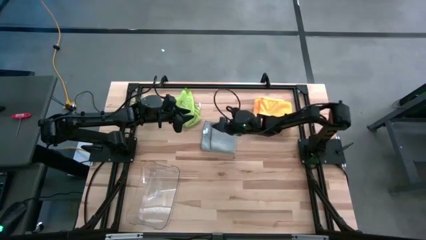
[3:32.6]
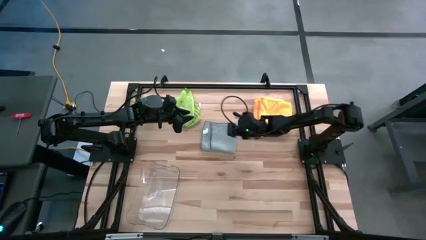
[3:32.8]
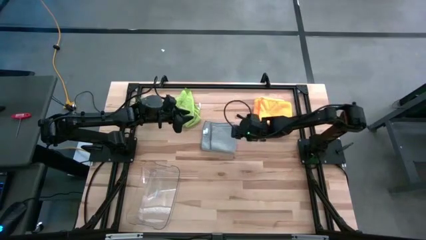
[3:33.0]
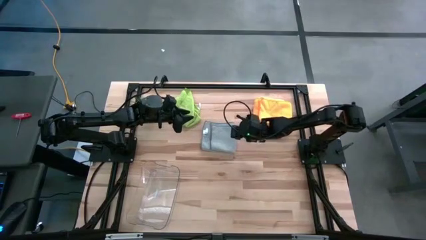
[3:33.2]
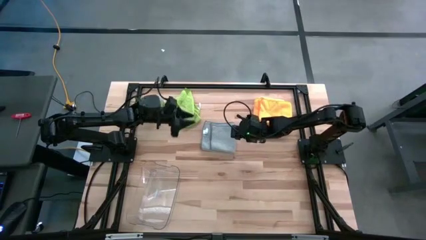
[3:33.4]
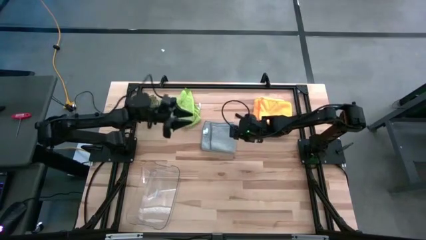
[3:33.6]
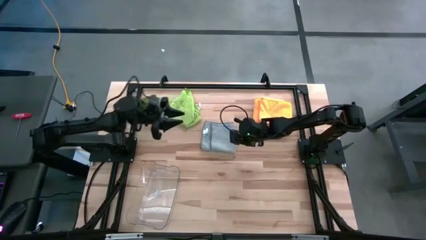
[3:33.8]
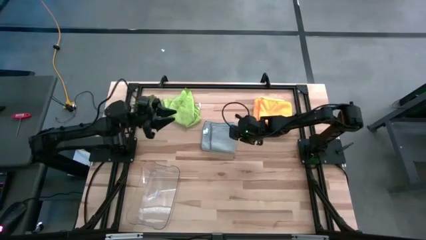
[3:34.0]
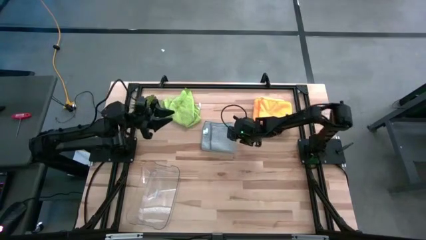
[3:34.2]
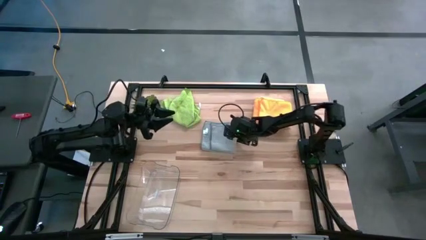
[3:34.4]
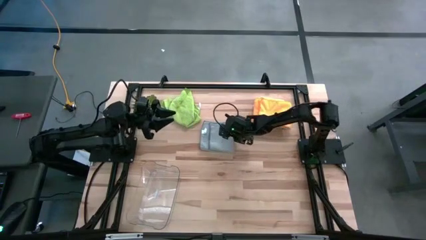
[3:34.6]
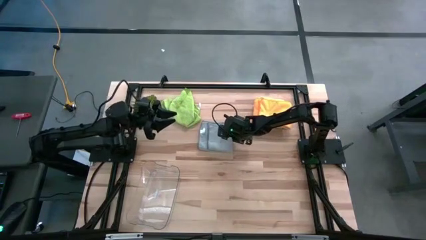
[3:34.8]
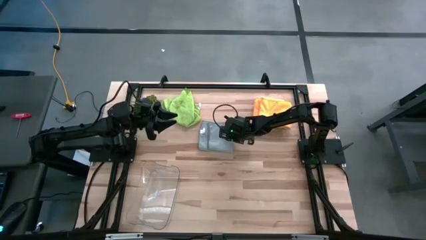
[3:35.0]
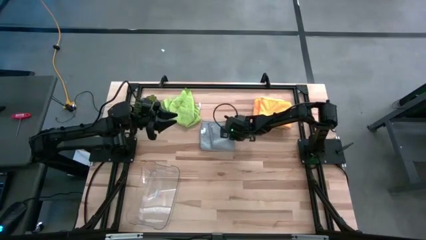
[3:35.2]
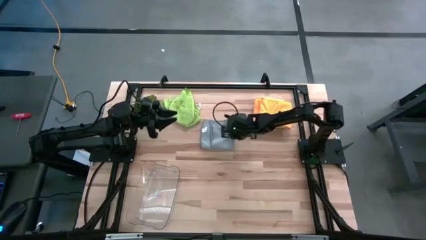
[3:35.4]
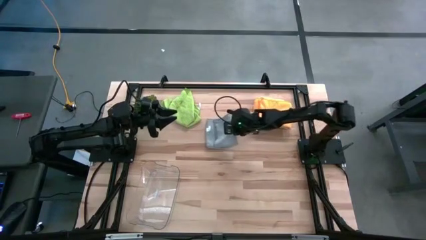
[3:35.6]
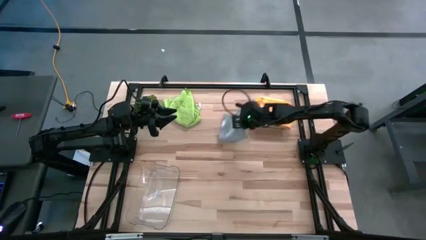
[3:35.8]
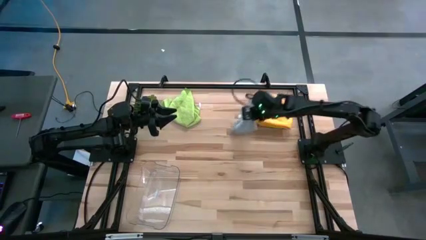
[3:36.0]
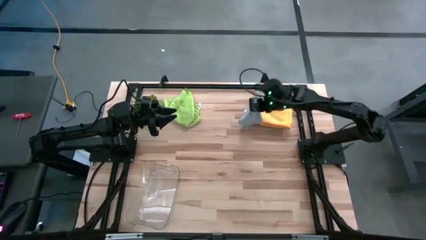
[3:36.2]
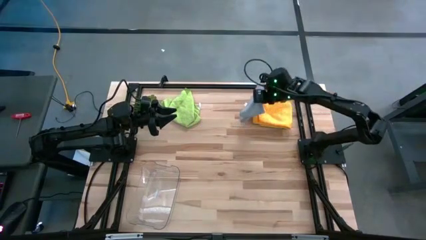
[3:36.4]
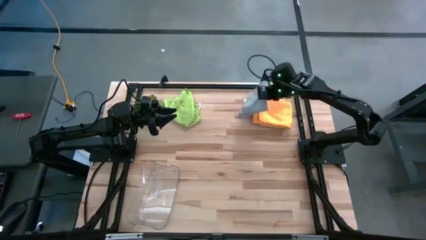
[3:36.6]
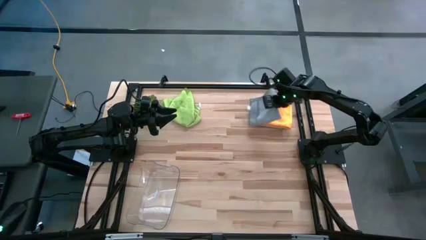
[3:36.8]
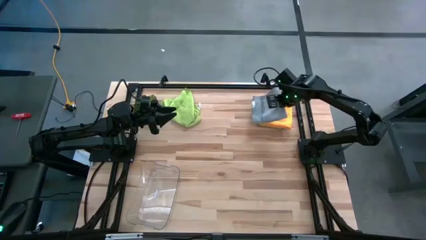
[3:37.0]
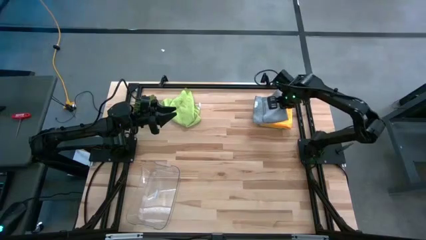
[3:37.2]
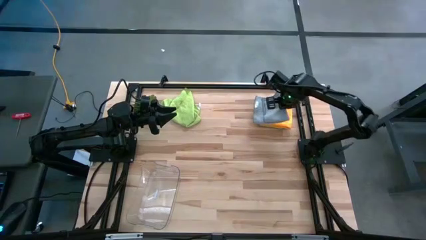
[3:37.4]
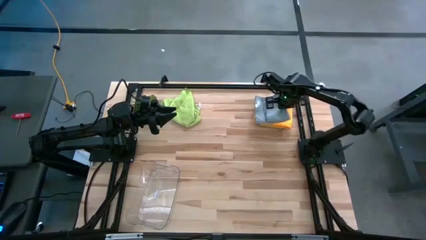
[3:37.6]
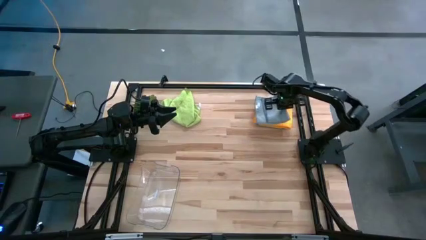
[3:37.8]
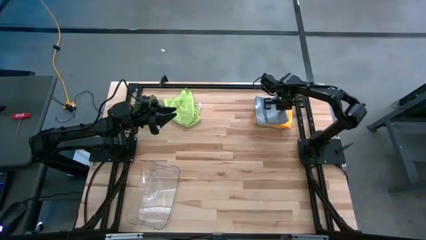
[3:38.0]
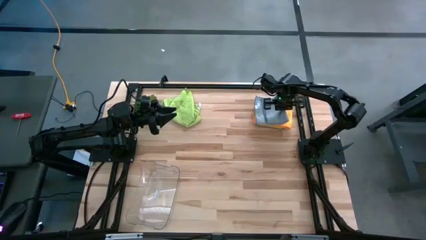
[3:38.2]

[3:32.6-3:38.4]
Task: Fold microfiber towels
Stack the light blue towel on top of the orange towel

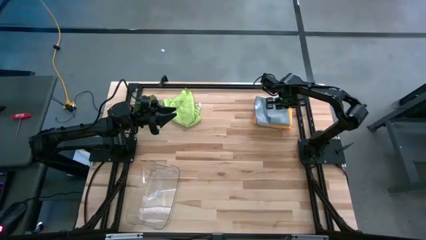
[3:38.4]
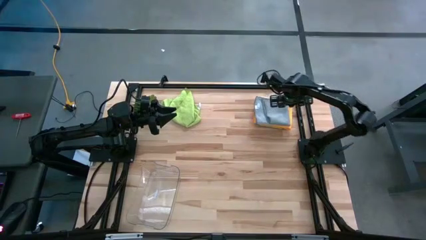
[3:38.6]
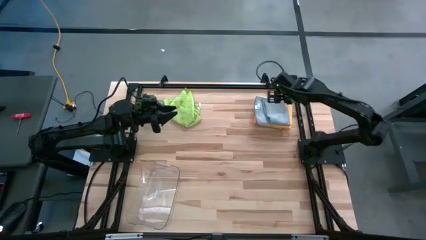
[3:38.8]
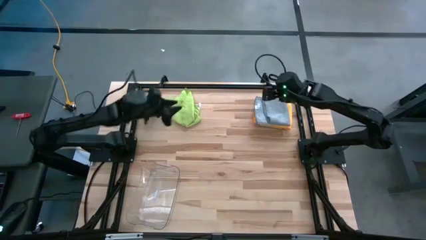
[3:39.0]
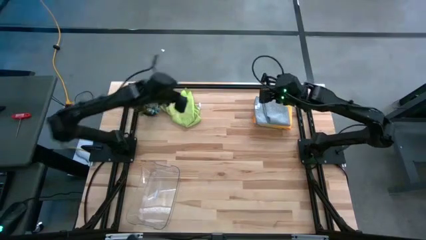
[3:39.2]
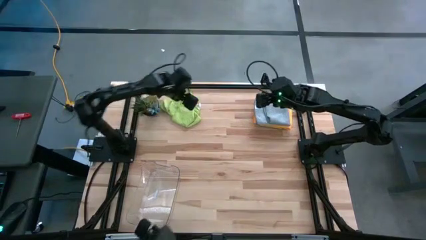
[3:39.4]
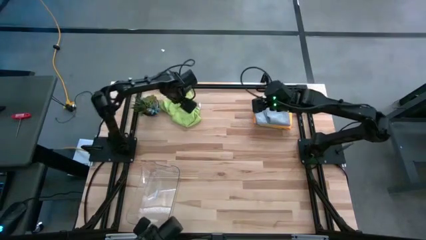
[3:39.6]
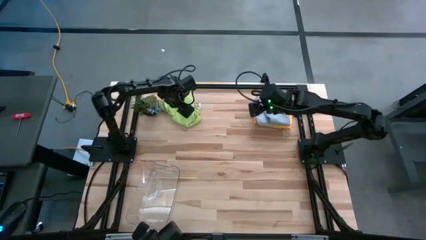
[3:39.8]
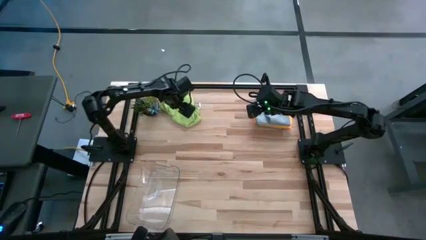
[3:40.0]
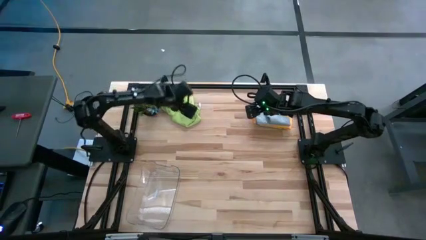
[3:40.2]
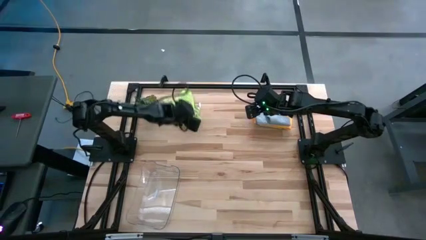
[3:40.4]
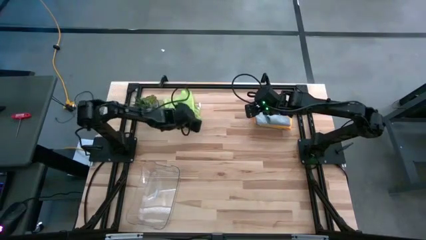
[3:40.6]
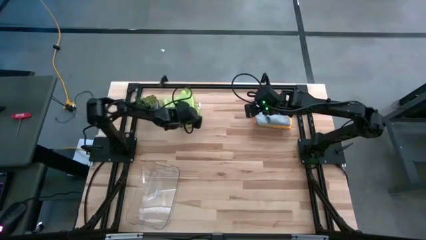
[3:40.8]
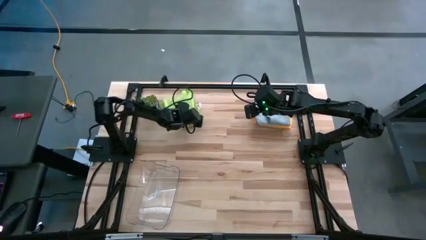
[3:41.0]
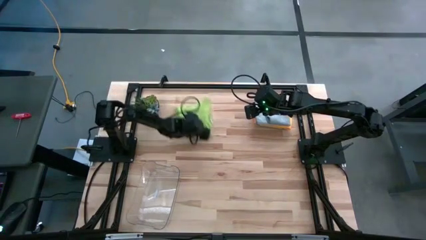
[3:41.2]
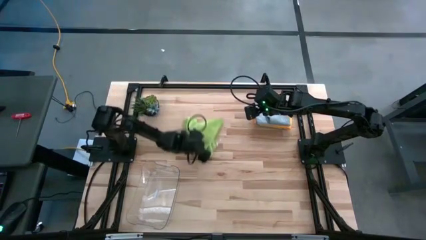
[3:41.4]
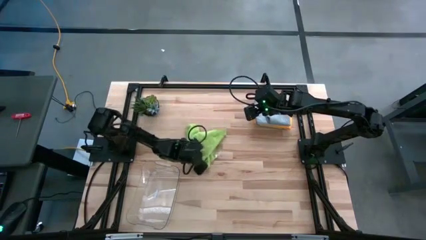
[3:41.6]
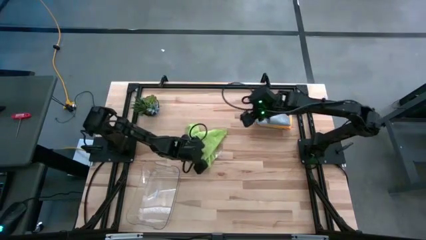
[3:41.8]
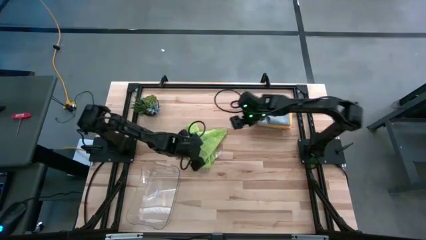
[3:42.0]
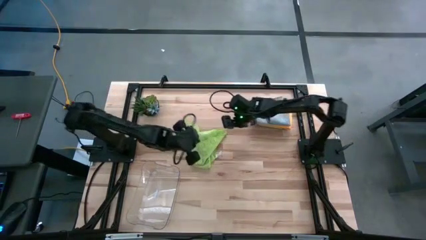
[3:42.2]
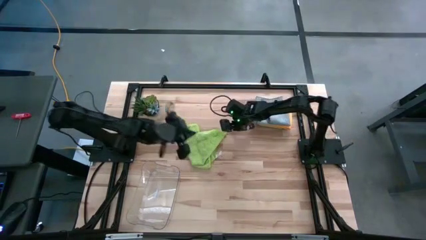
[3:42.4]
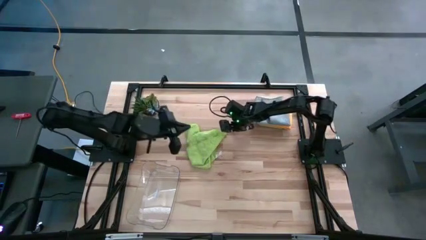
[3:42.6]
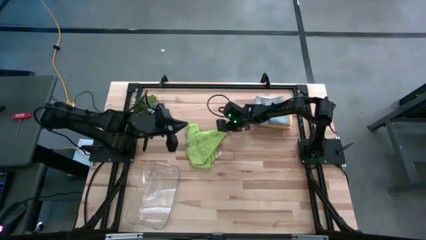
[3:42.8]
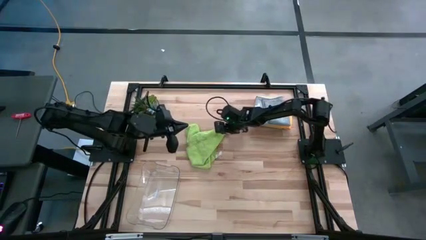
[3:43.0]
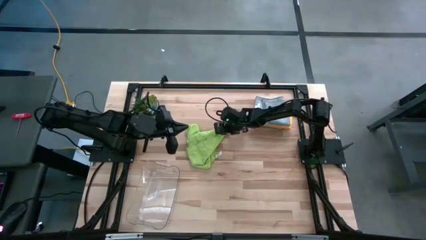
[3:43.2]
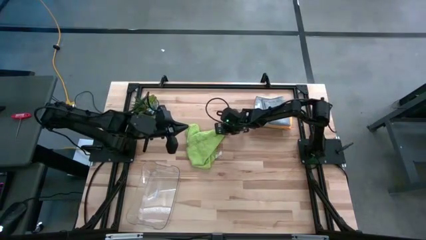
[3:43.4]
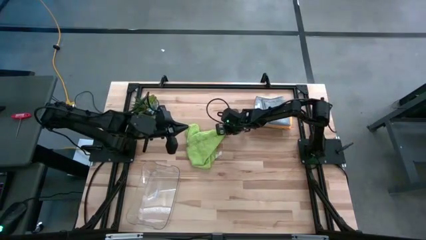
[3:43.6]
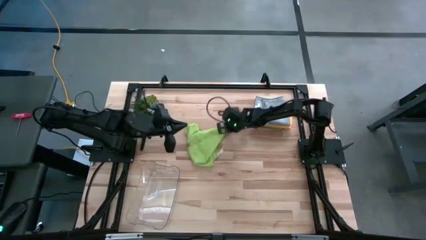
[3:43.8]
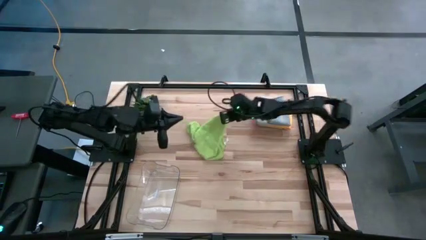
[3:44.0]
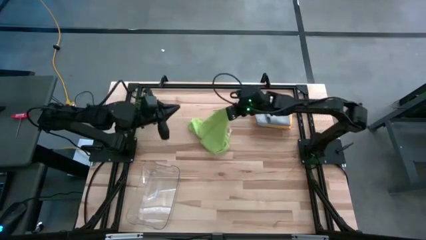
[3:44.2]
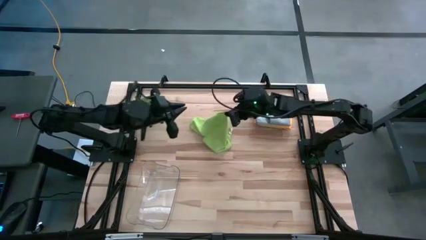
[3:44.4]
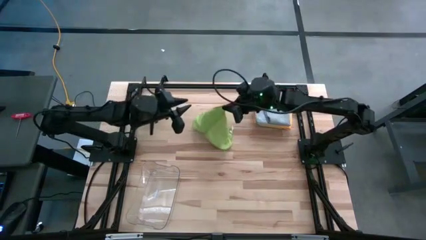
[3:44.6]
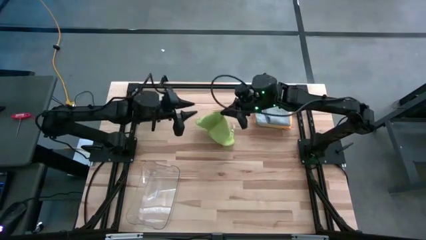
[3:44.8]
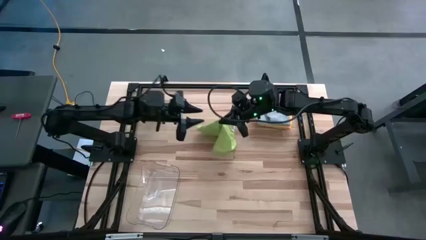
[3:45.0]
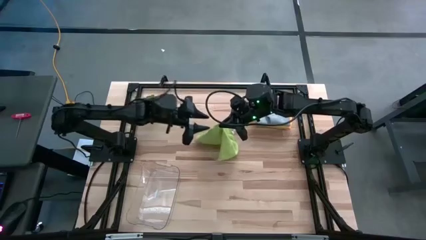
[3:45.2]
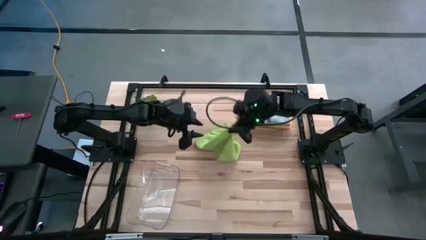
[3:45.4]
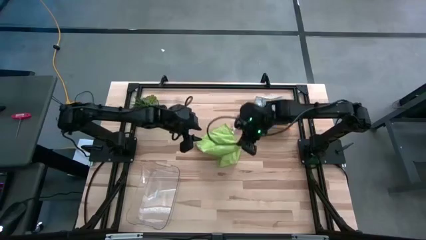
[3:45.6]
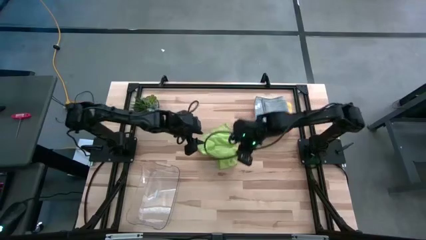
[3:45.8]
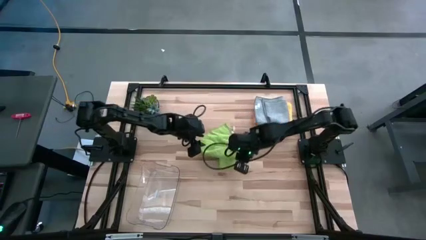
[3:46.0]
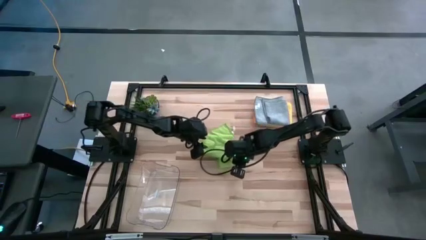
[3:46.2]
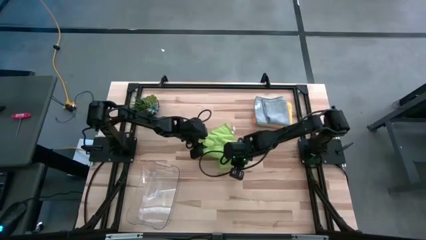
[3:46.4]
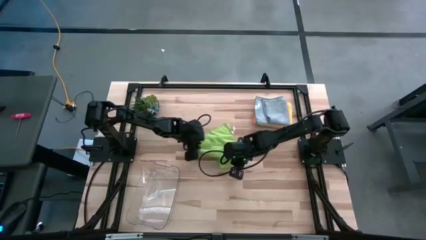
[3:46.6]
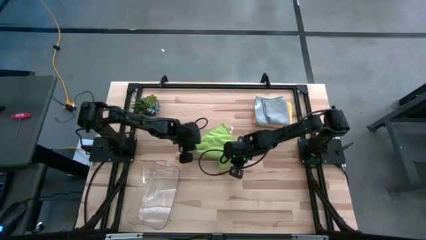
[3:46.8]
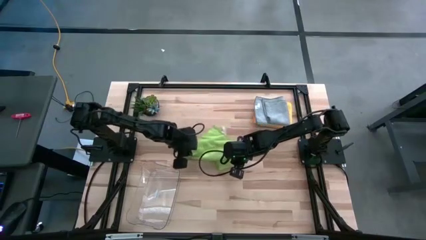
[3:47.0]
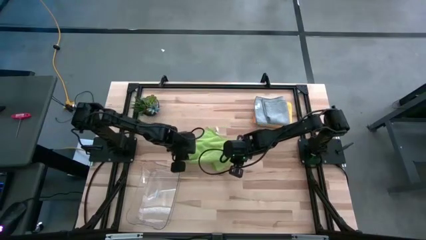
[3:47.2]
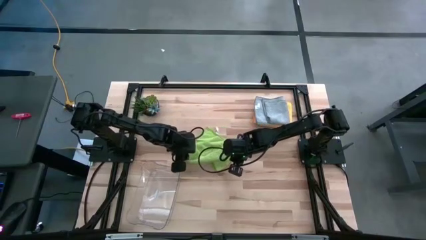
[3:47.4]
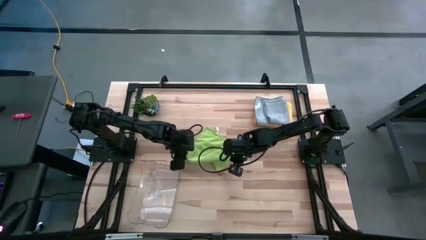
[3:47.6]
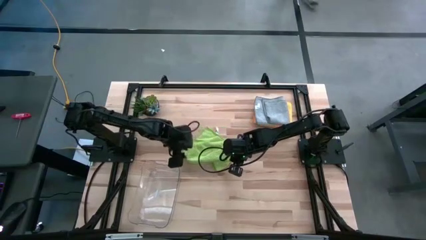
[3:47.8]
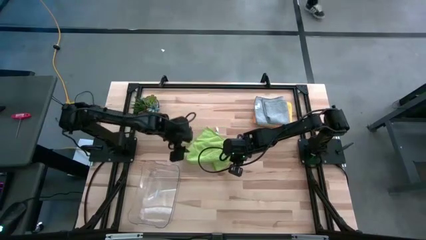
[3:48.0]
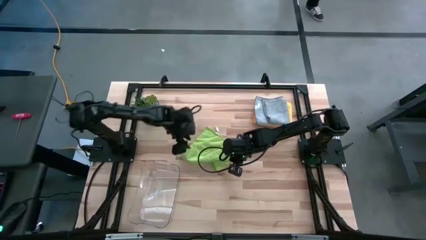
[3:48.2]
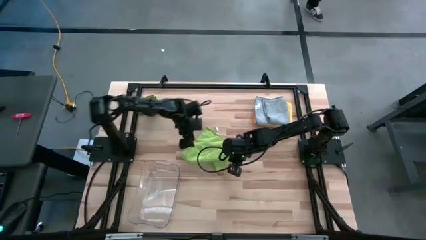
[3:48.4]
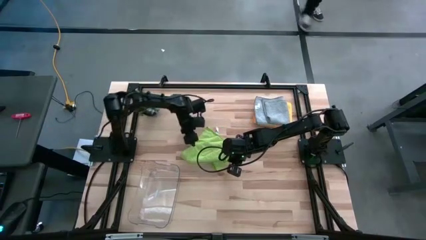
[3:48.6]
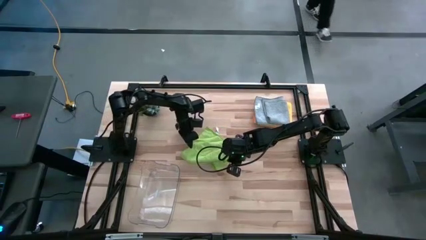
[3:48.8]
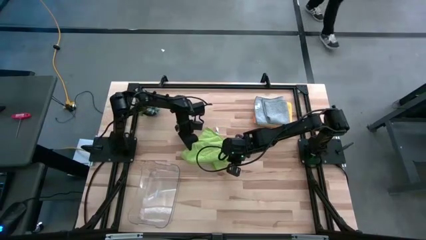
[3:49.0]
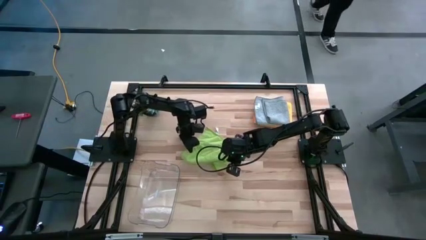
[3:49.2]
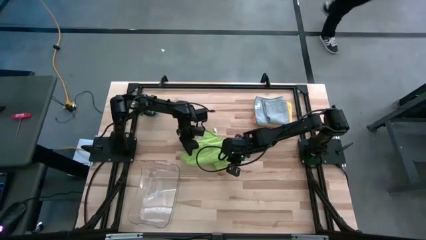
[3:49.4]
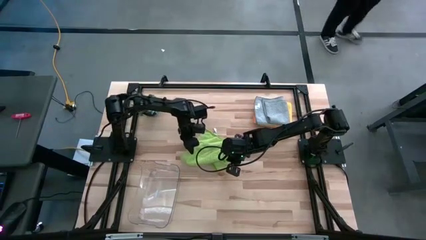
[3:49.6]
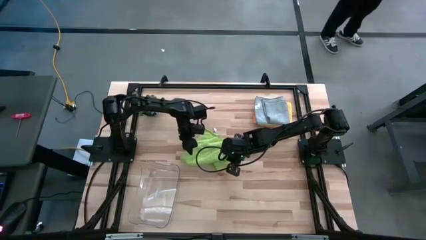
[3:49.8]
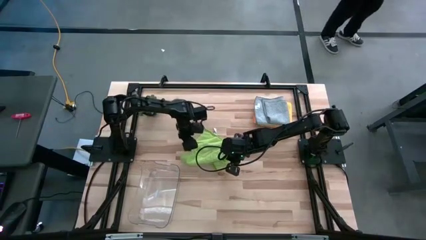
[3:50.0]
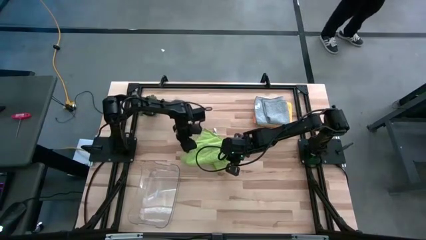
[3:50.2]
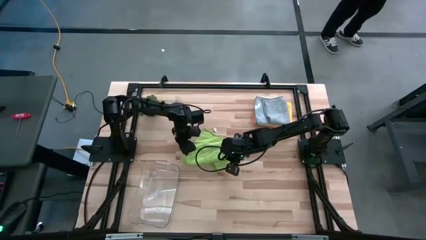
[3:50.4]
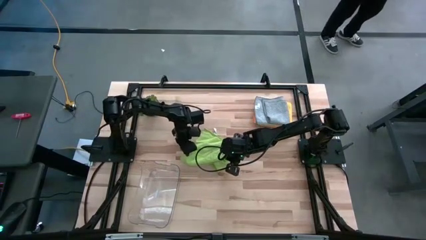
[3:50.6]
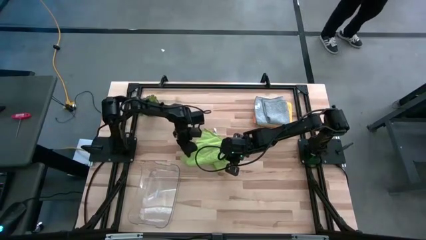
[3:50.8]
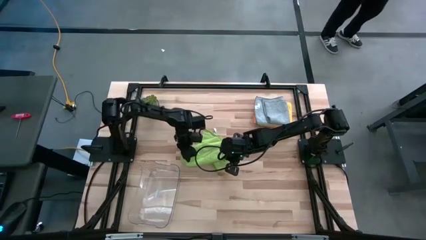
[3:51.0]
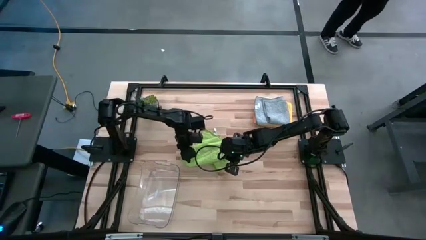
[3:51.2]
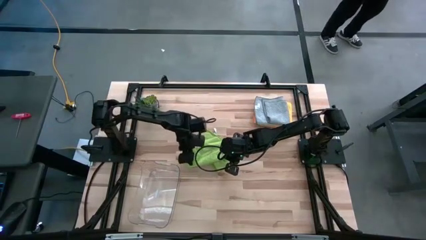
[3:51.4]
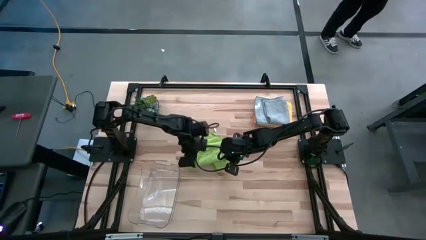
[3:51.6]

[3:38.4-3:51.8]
Fold the green towel
